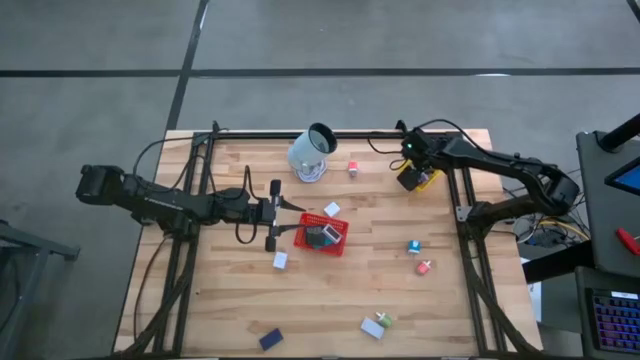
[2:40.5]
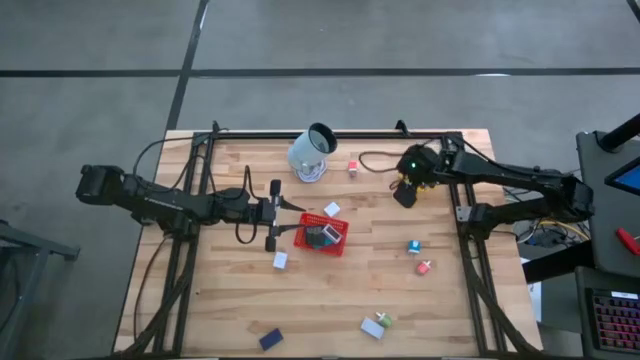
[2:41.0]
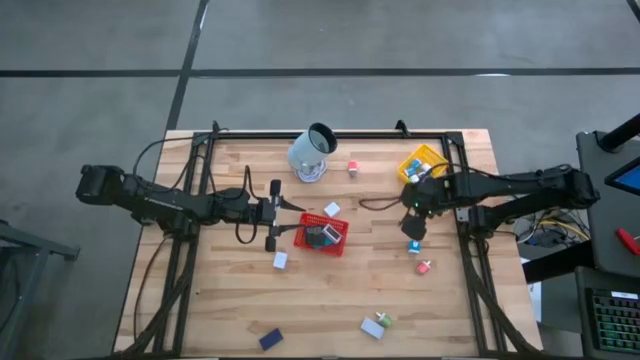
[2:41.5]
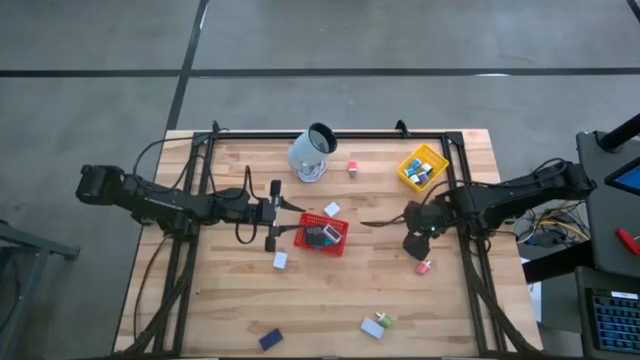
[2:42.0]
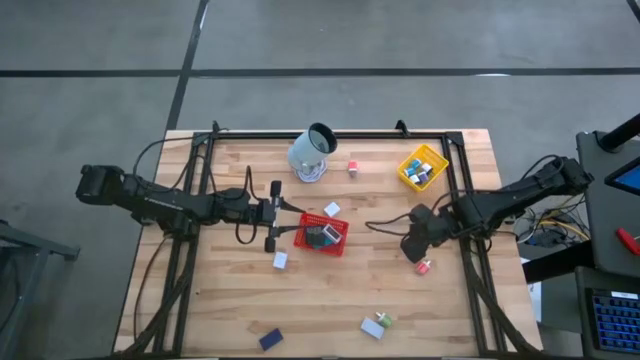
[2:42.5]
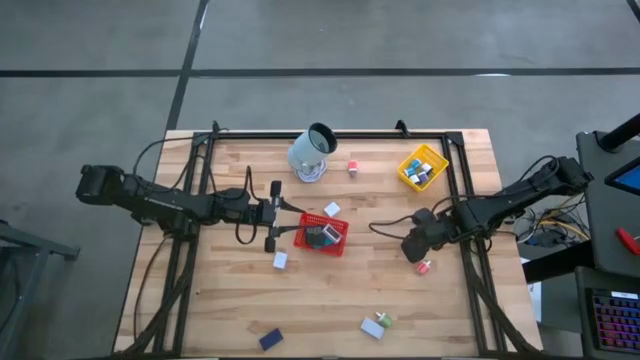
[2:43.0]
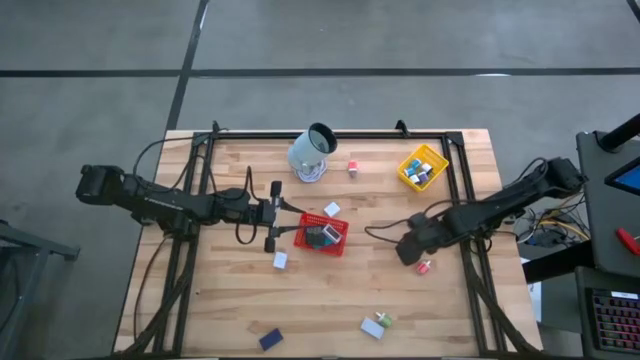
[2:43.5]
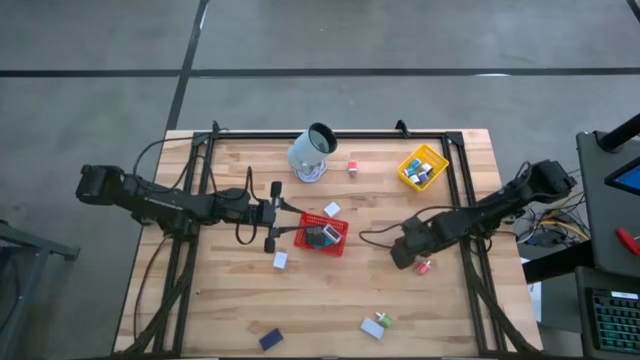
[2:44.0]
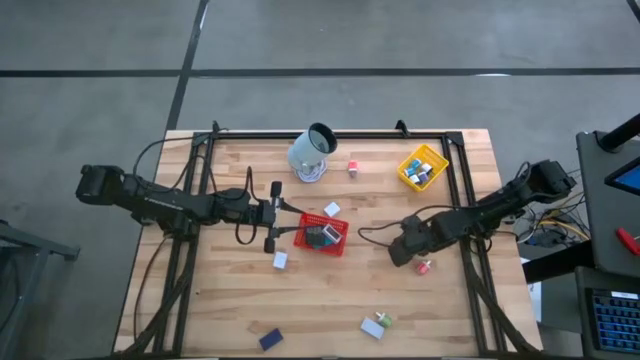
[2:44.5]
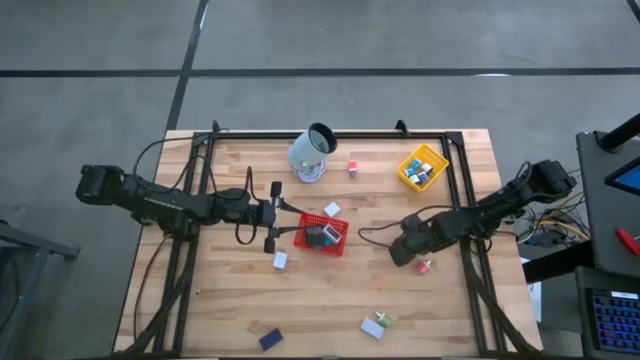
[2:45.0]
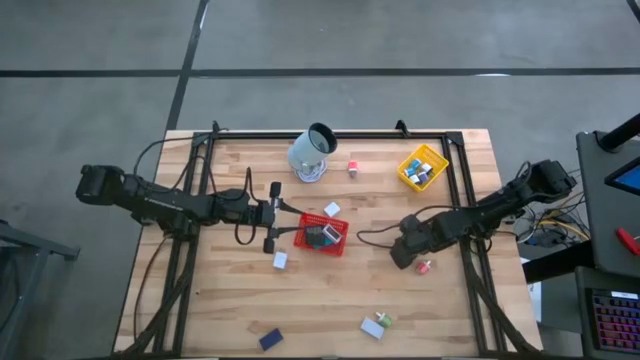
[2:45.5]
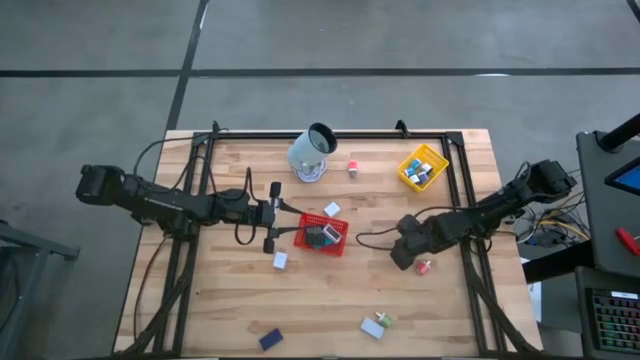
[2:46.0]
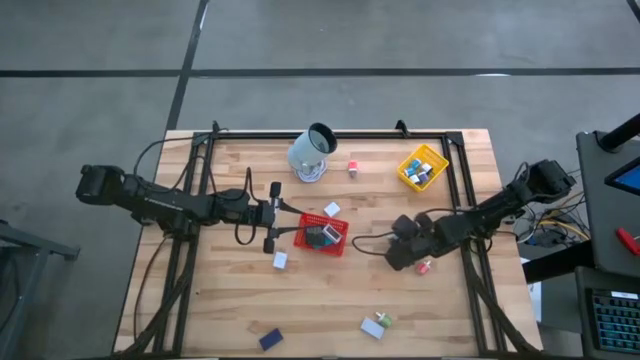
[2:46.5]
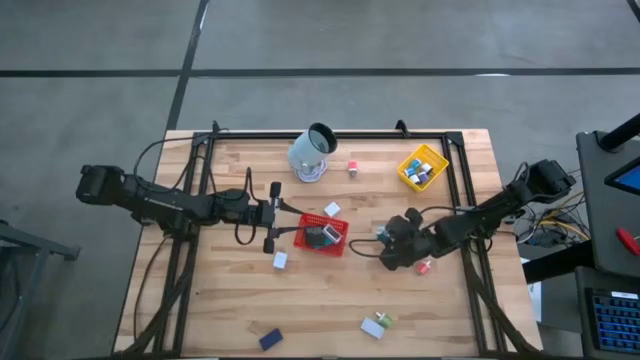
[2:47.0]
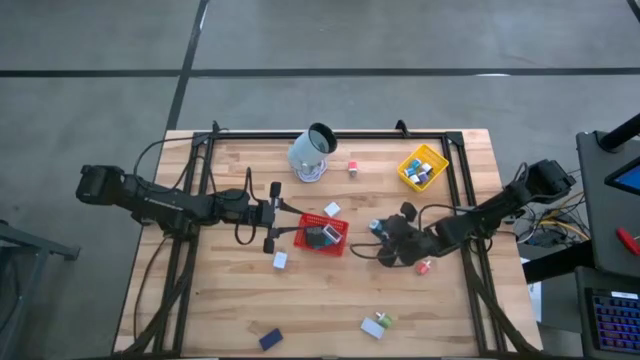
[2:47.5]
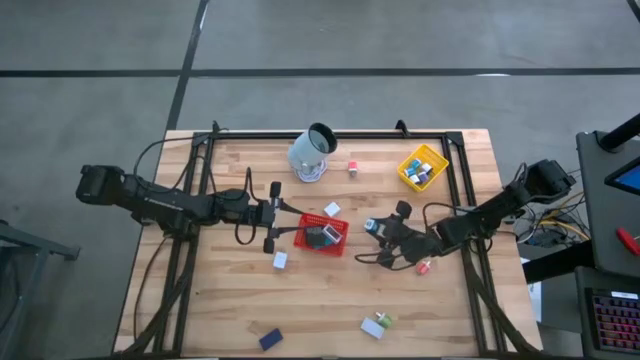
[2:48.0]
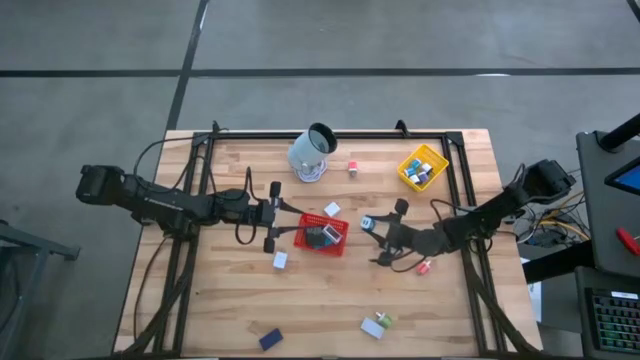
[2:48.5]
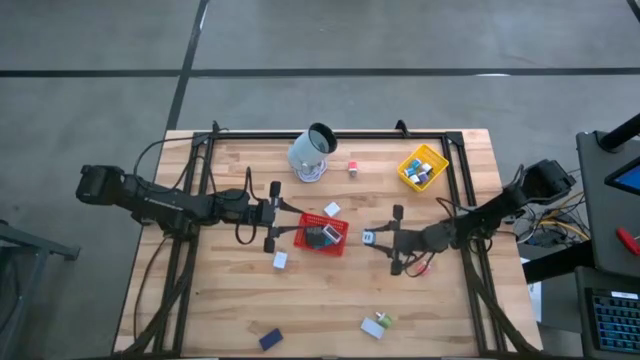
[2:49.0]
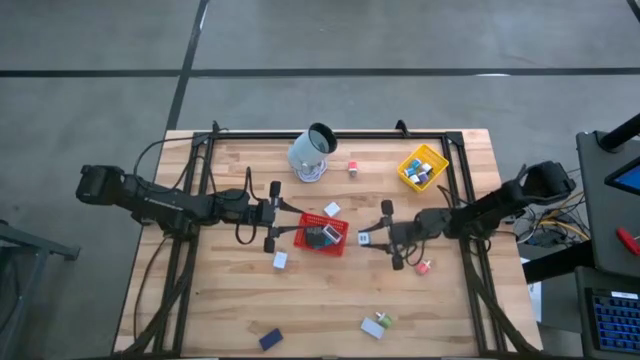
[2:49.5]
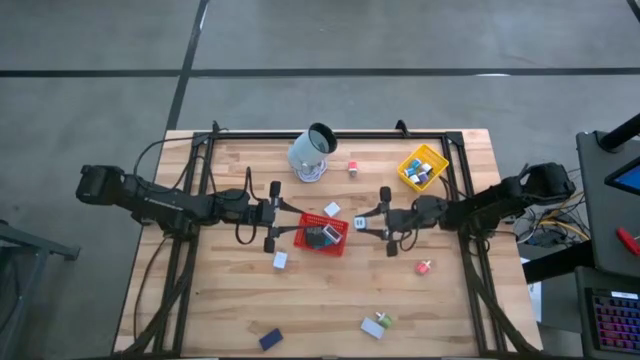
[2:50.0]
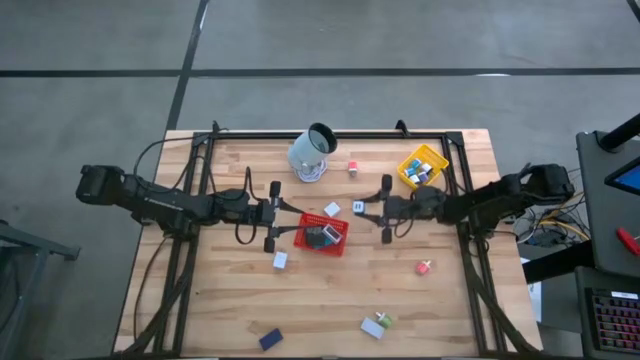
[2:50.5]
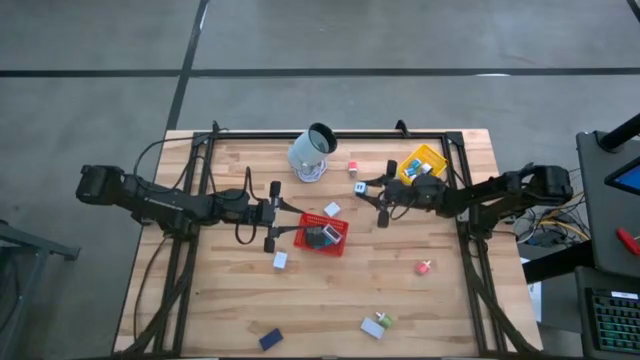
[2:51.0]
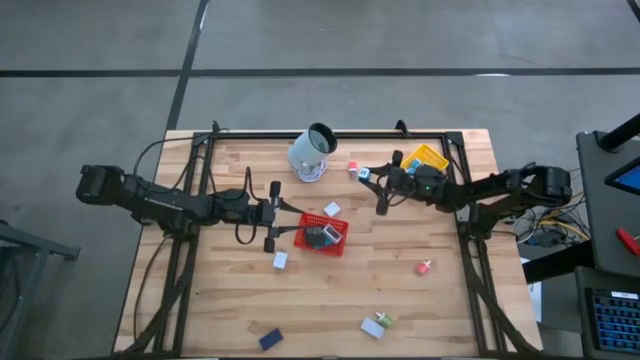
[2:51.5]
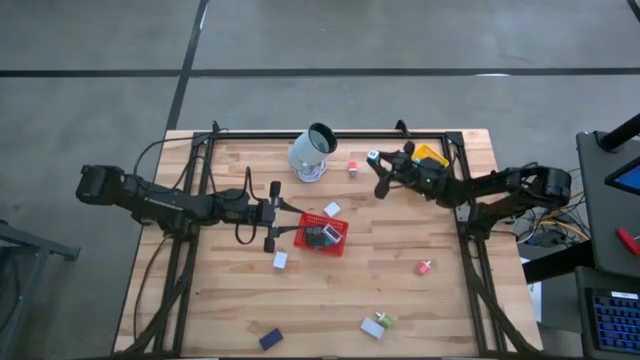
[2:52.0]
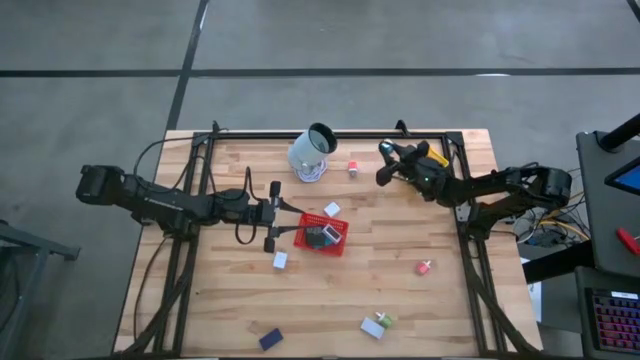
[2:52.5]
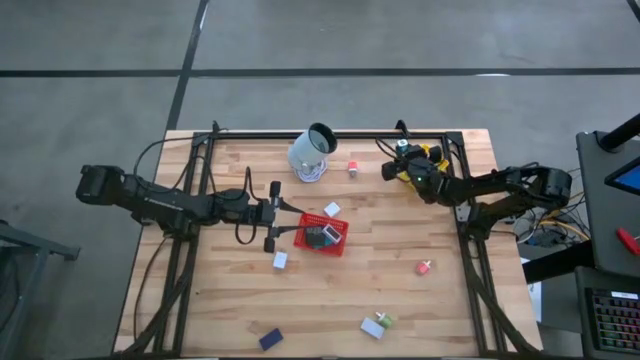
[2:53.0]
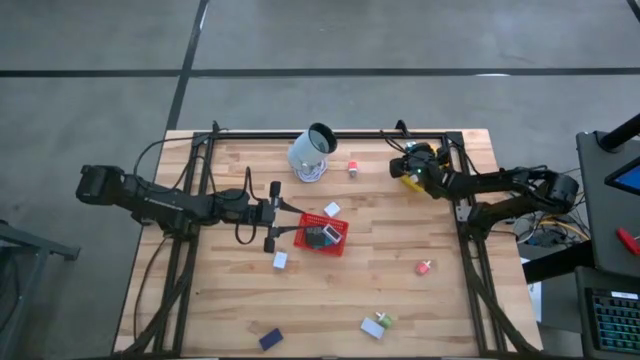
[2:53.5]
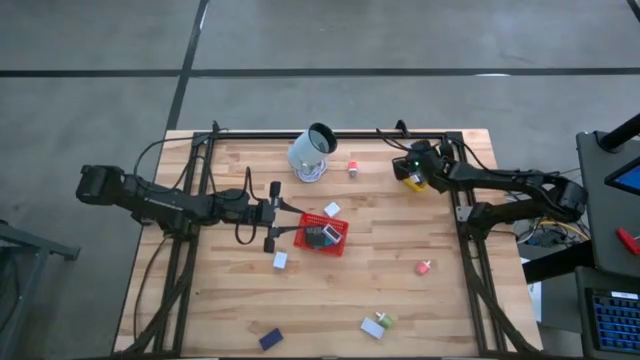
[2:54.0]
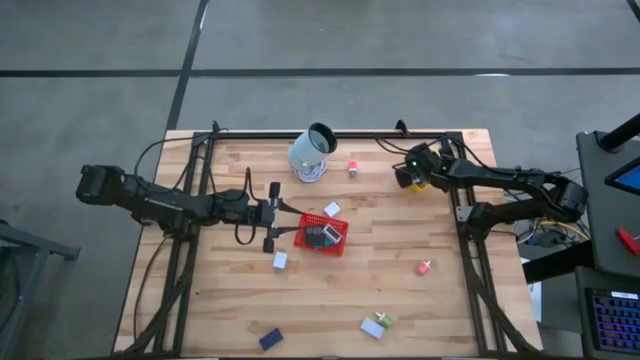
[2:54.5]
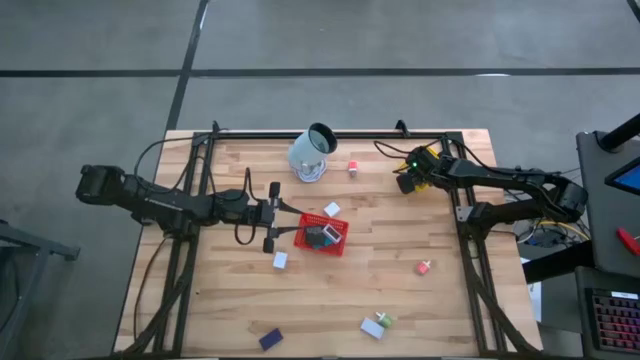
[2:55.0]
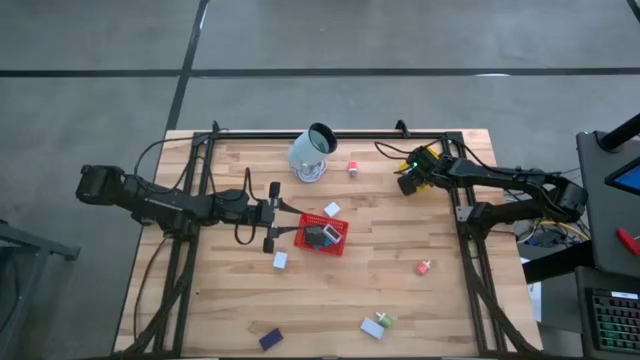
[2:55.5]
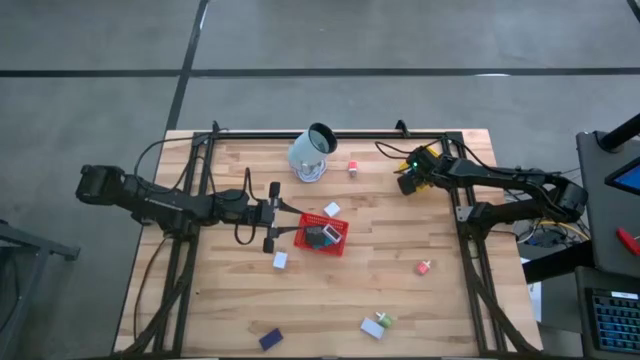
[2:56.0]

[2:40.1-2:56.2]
Task: Pick & Place Office items
Put the blue charger adapter into the yellow basket

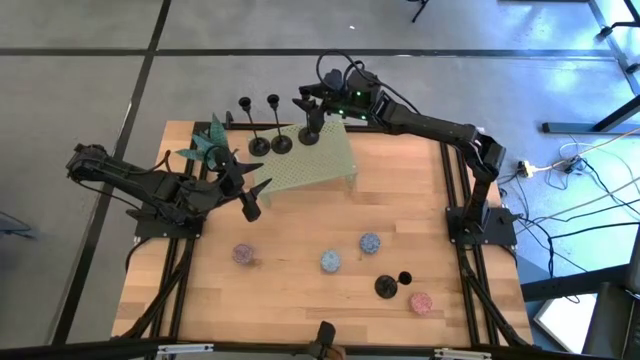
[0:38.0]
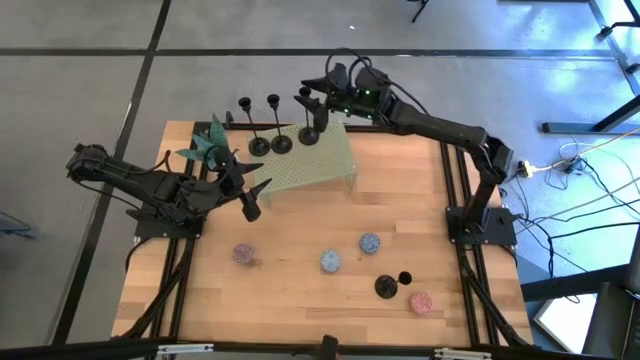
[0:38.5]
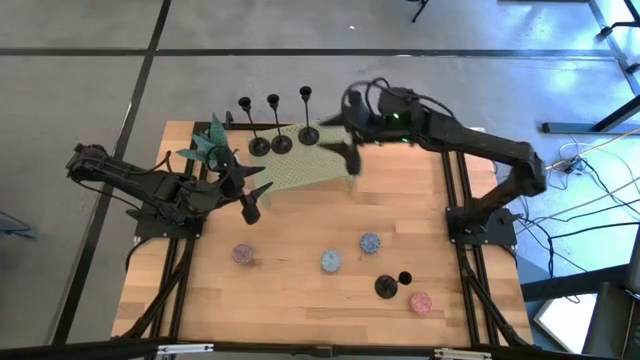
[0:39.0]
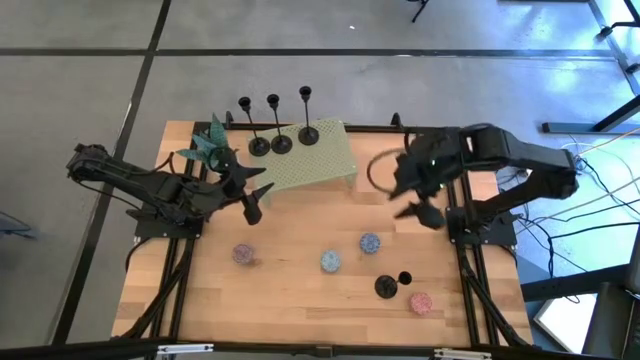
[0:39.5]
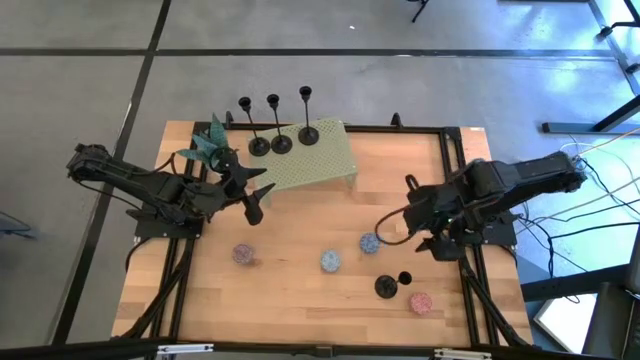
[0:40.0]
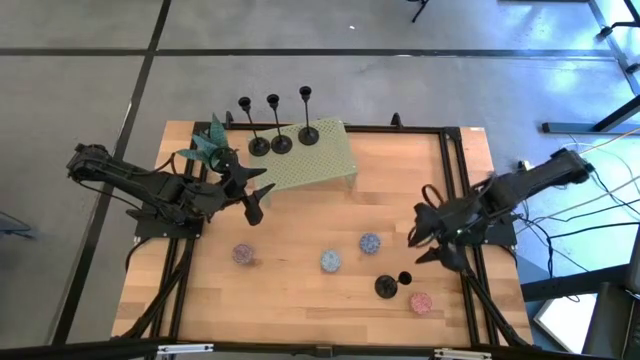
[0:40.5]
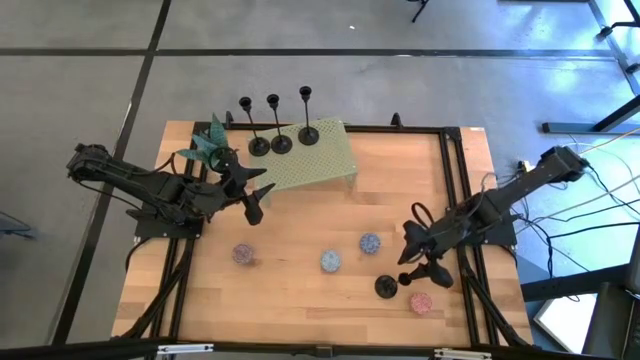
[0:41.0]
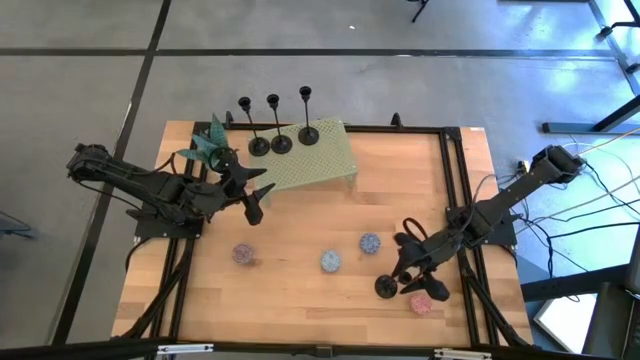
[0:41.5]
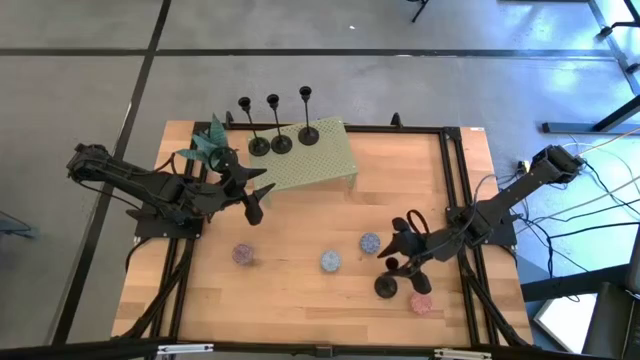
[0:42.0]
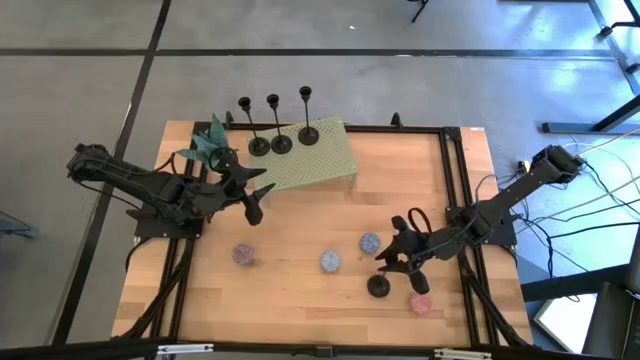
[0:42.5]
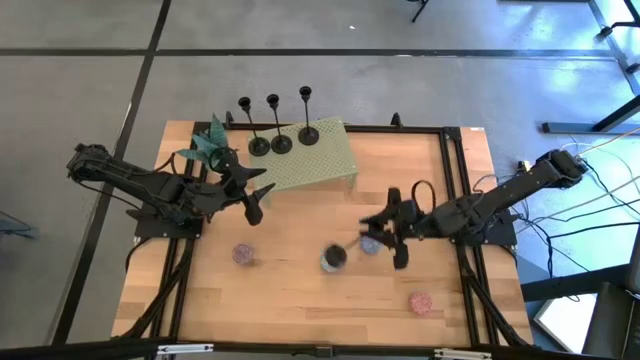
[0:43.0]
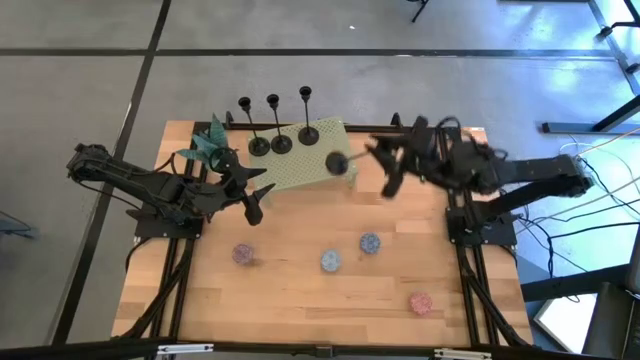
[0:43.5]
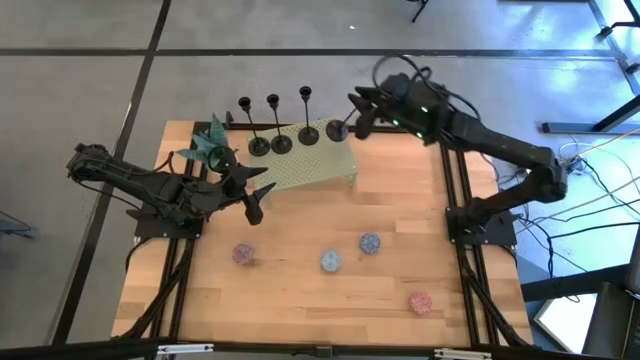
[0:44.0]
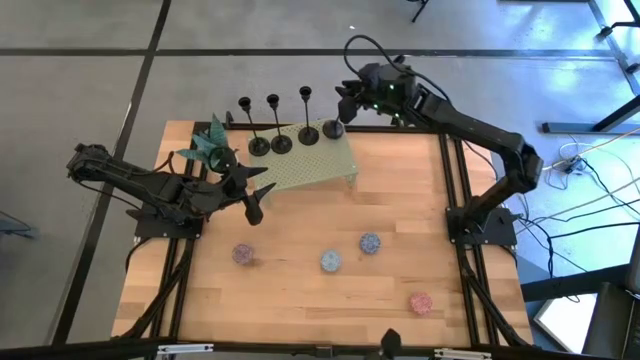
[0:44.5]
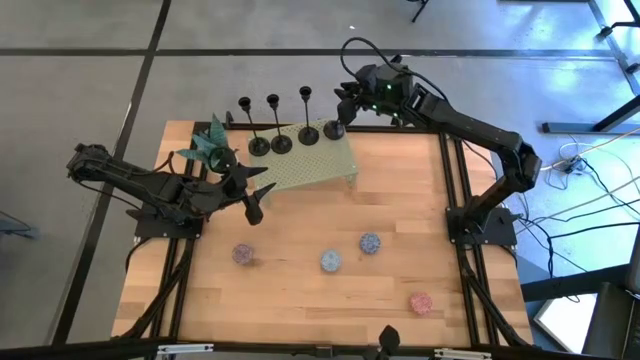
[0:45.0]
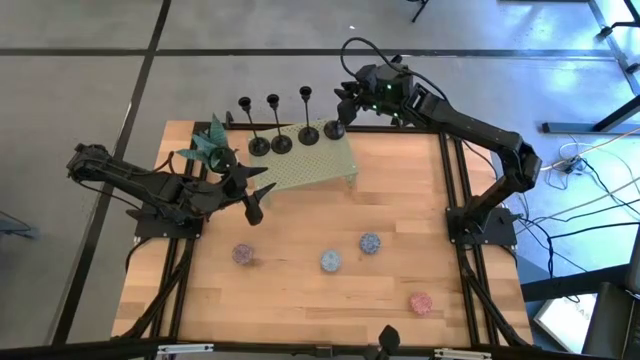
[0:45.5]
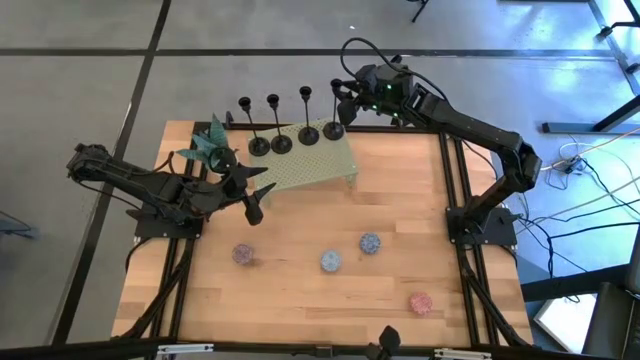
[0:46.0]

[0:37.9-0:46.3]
Task: Pick & Place candle stick holders
Put the black candle holder on the shelf
